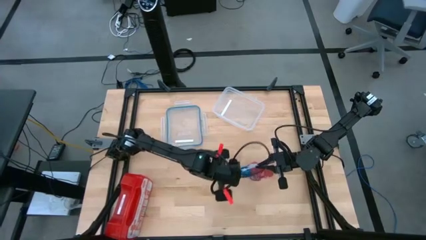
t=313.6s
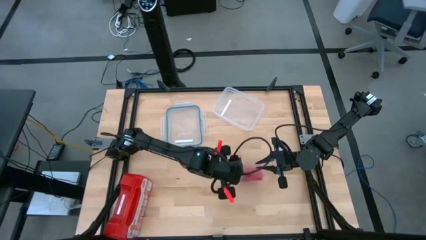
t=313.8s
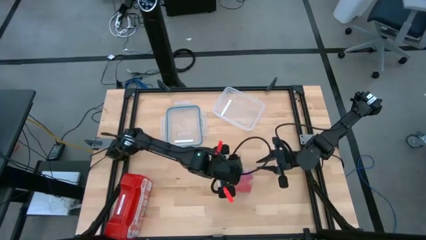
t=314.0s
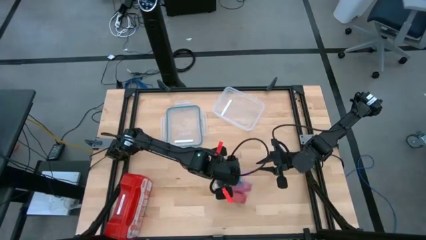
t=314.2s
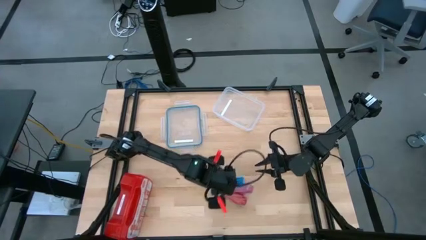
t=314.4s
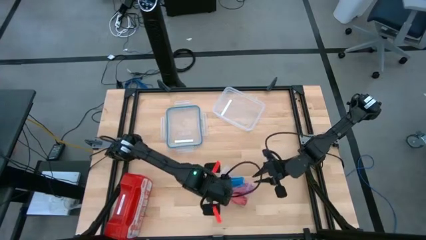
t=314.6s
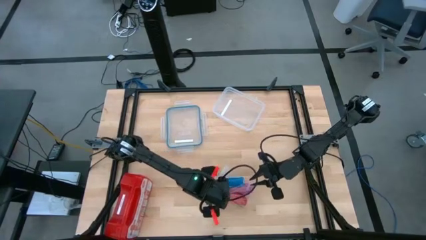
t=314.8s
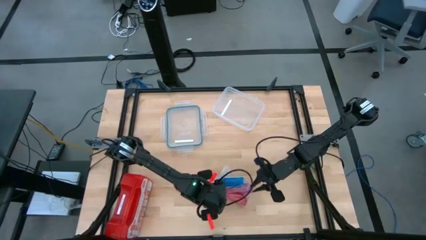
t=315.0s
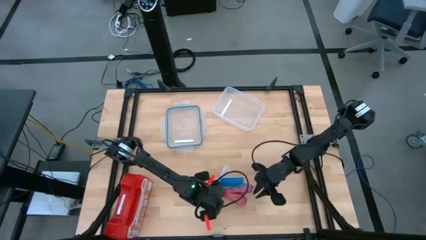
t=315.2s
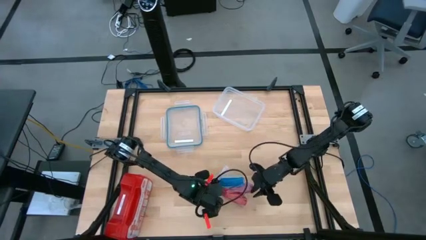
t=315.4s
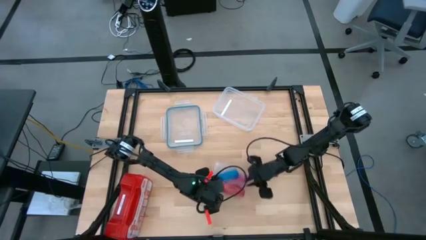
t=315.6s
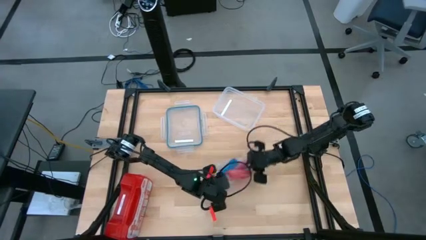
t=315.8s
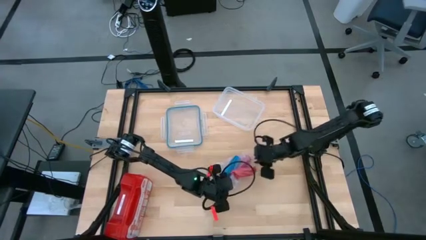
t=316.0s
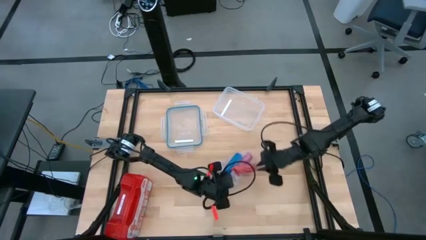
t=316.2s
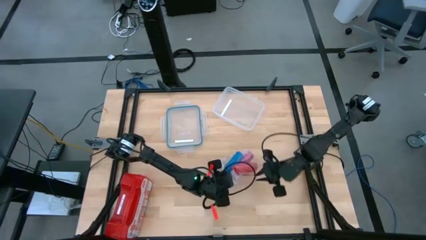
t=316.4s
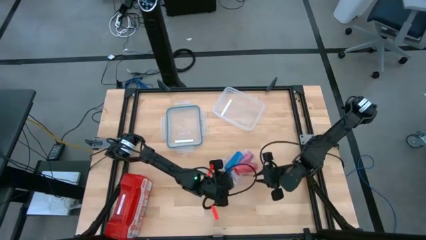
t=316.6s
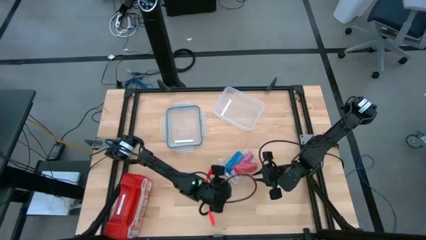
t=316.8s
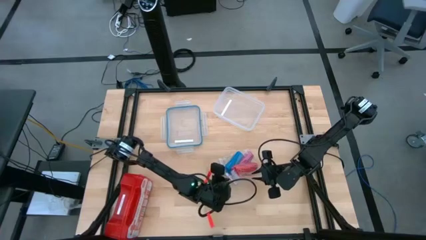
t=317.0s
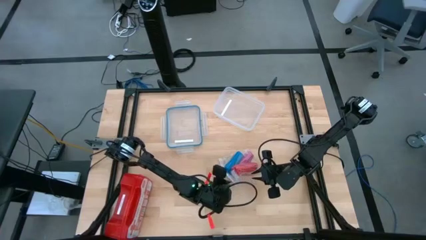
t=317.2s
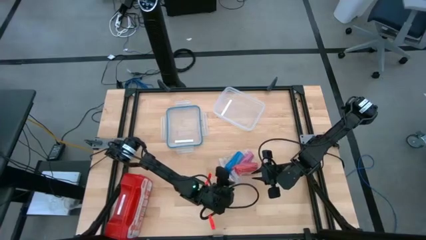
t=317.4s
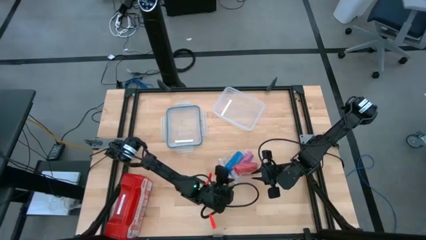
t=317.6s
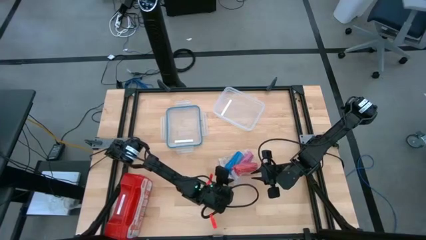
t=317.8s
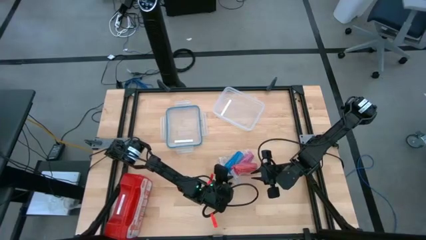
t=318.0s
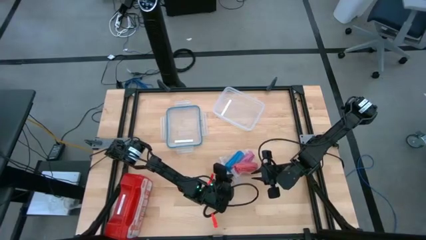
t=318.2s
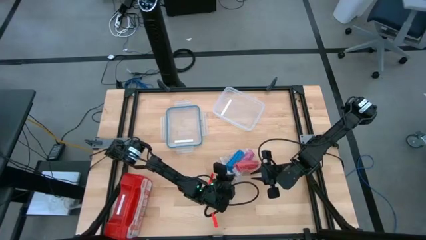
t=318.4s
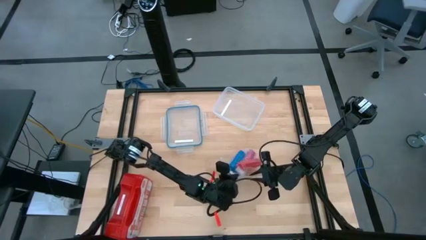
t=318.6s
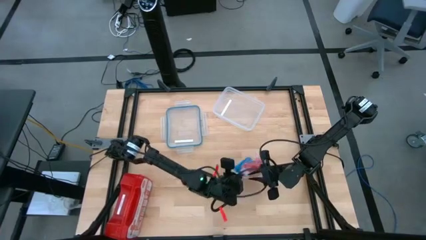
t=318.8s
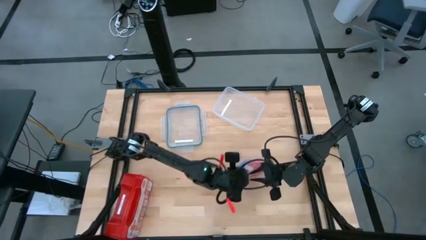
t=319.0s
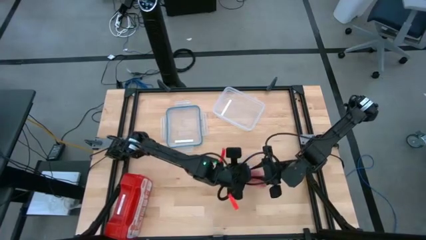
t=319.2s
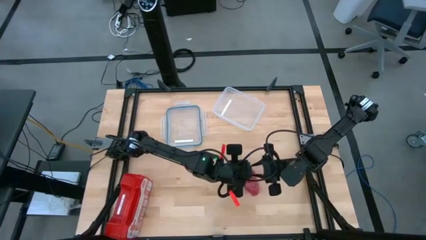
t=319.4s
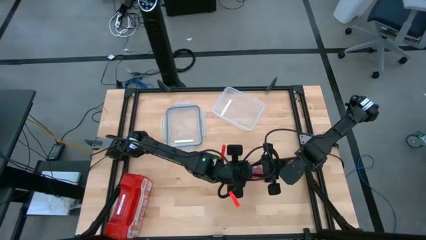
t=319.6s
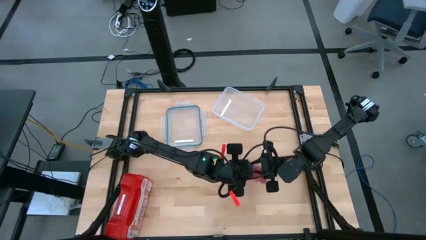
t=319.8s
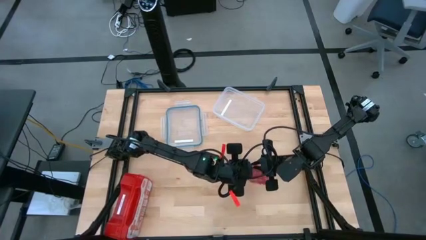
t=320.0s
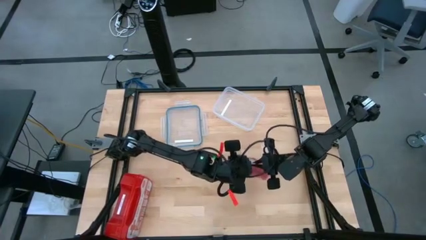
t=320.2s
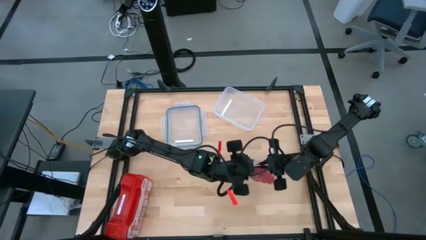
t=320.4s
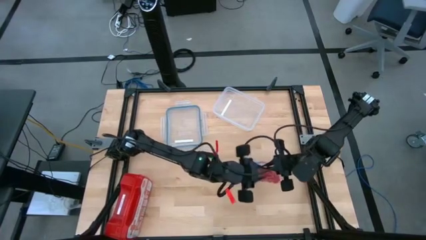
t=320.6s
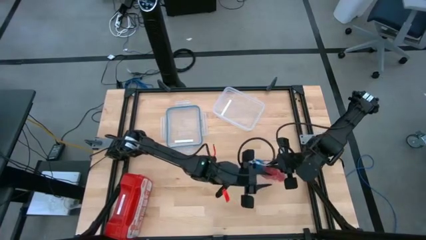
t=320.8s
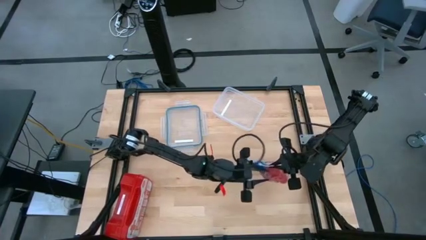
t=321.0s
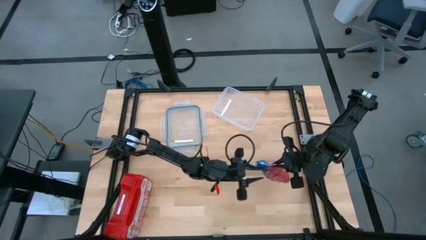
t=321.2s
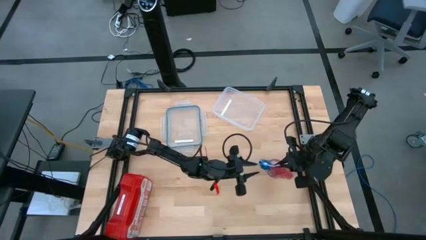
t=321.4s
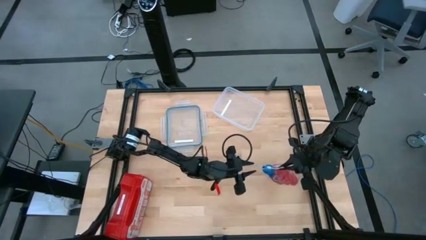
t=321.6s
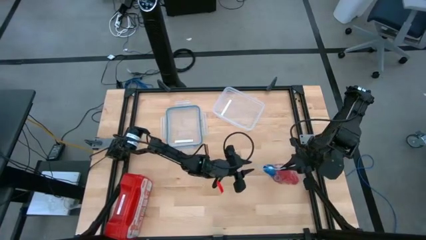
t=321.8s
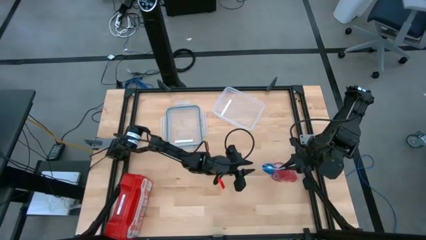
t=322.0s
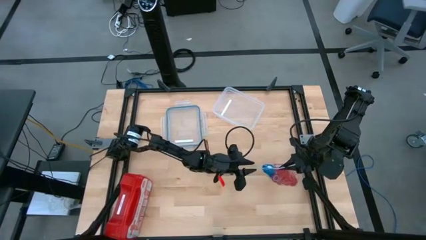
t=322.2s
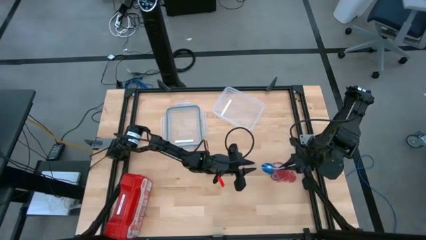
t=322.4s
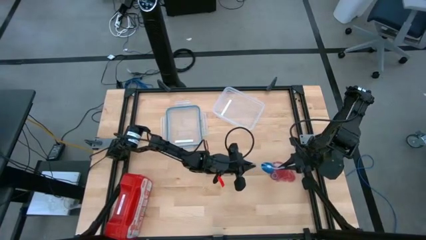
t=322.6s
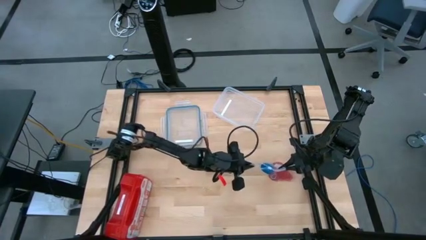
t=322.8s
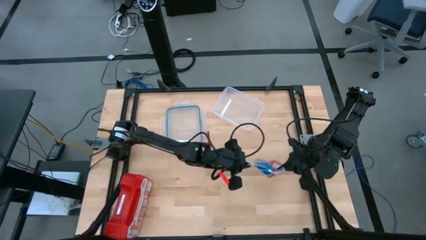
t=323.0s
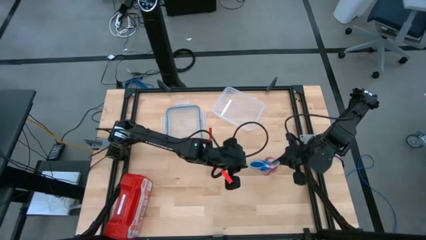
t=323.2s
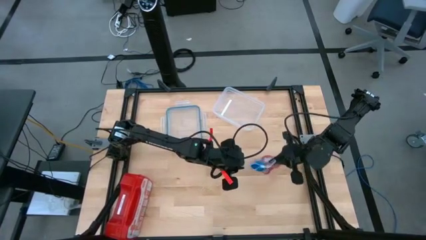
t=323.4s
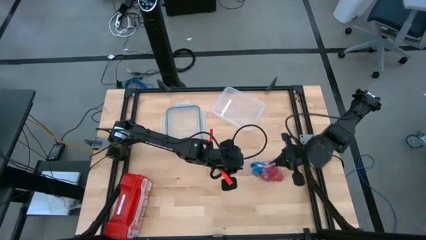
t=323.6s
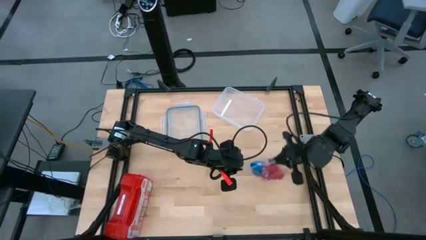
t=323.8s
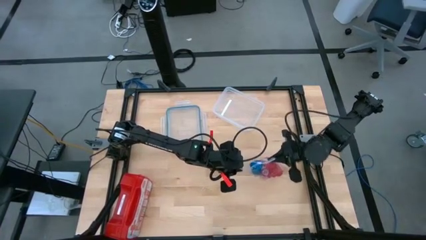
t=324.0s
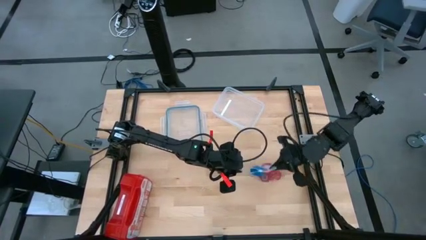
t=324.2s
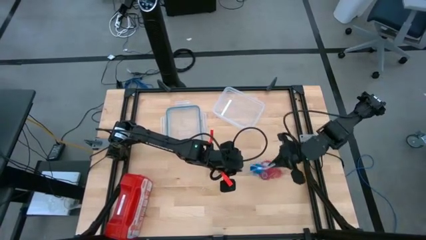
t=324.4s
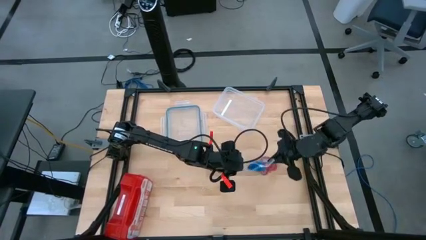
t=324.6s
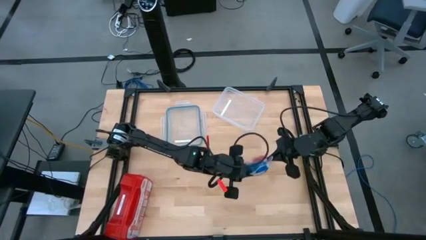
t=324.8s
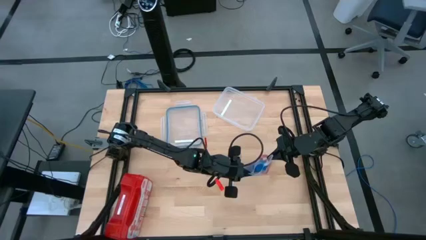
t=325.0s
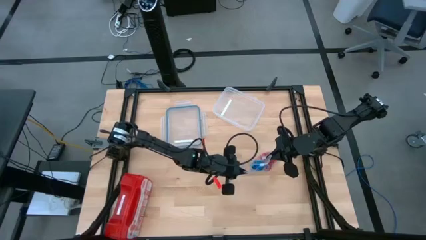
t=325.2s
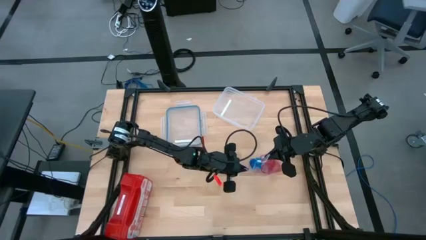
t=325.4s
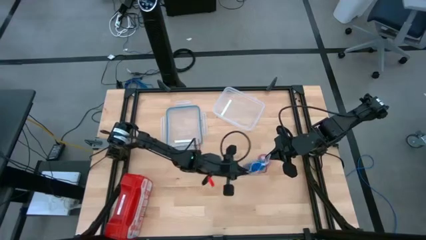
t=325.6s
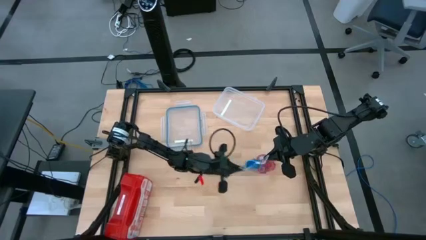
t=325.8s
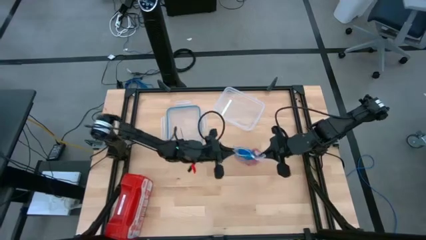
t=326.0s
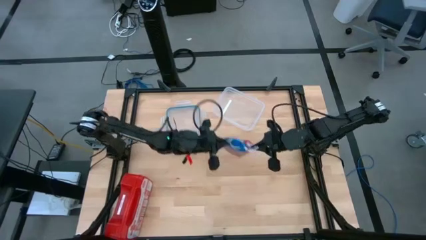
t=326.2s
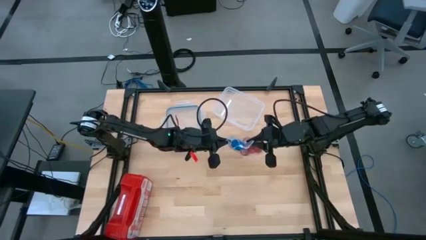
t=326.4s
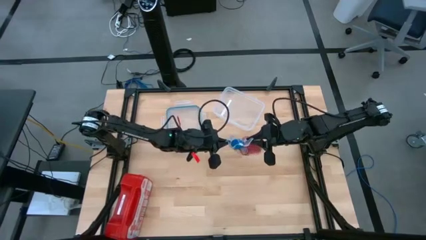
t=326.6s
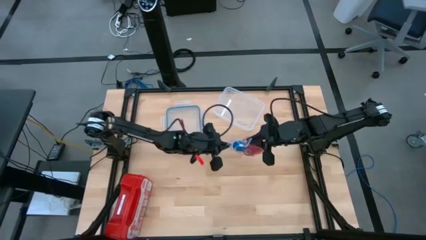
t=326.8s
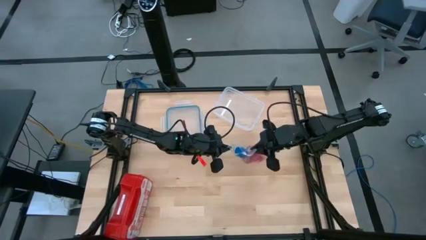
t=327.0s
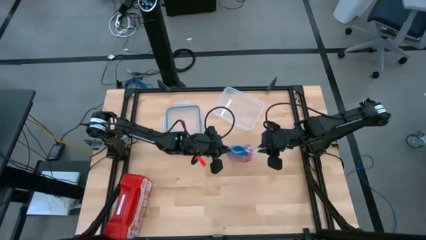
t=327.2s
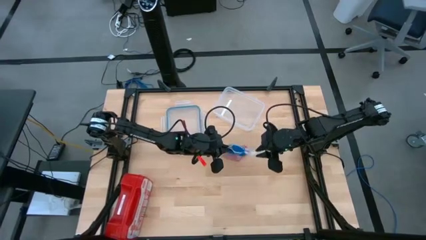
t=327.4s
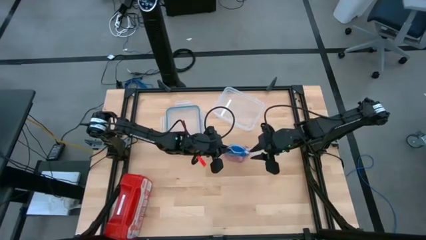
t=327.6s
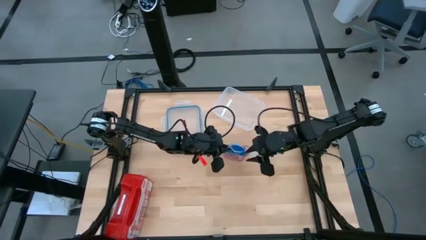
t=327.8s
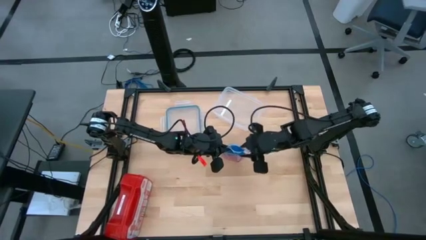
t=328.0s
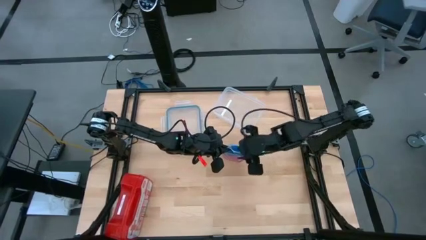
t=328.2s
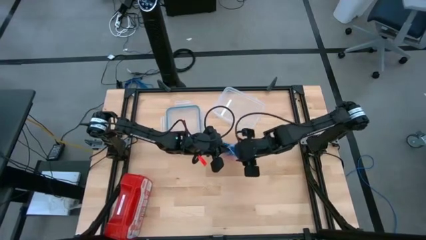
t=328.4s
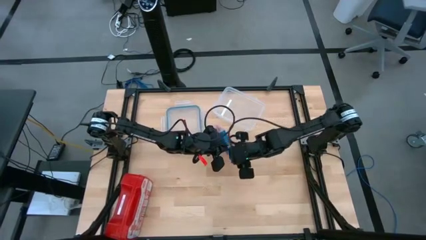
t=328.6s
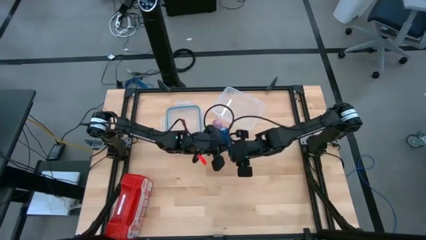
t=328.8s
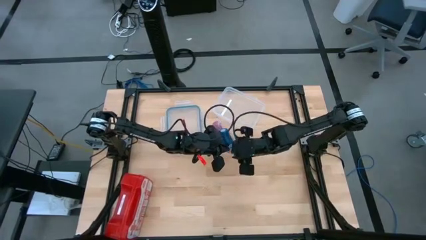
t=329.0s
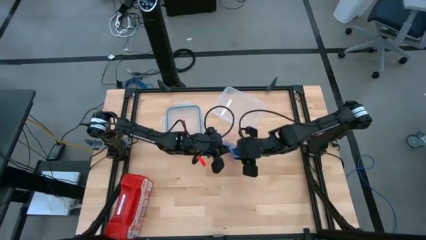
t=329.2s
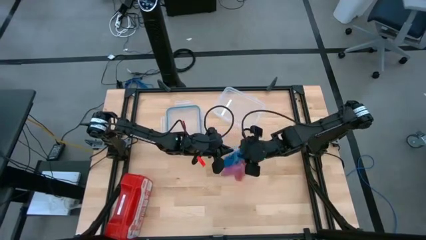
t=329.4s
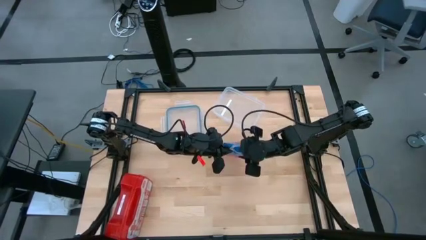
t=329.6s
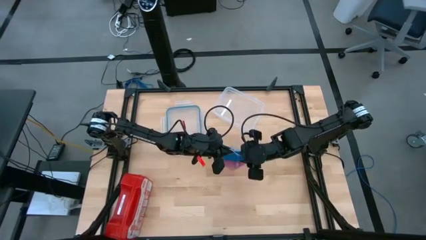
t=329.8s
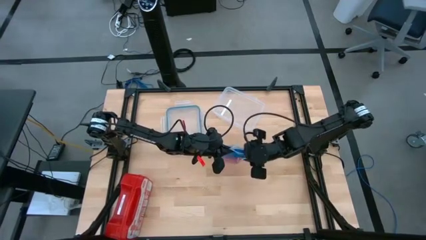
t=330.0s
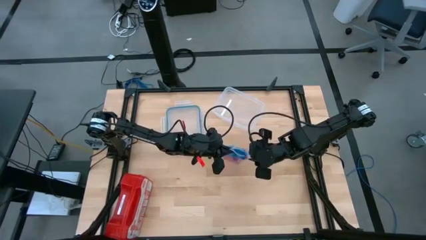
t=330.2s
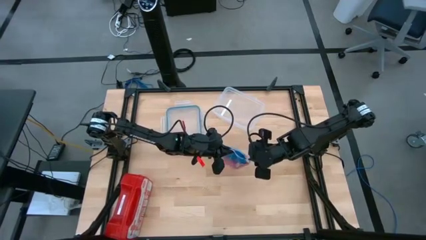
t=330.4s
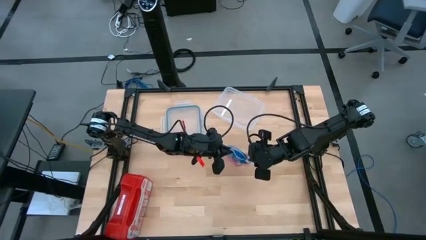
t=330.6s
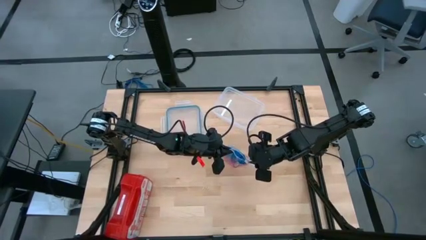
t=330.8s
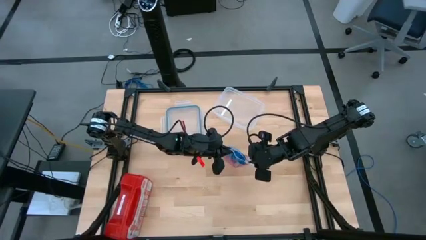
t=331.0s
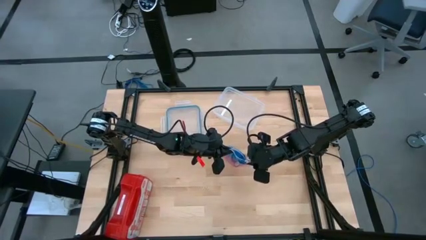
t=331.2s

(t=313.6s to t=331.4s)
Task: Roll bandage
Close the transparent zip bag
